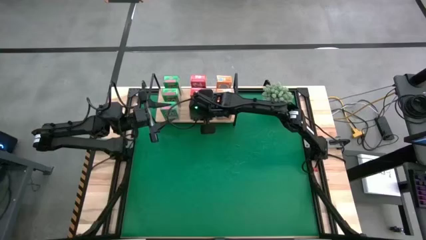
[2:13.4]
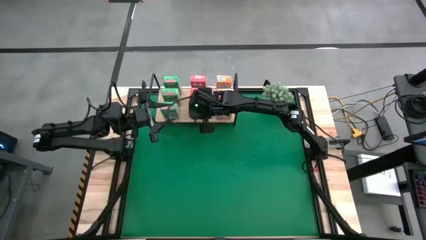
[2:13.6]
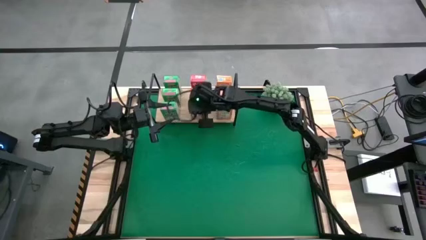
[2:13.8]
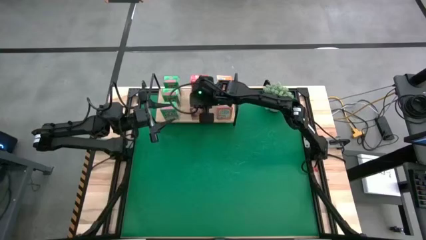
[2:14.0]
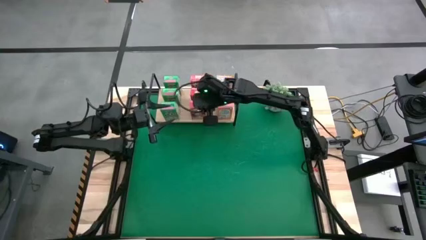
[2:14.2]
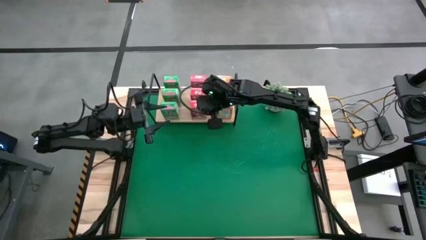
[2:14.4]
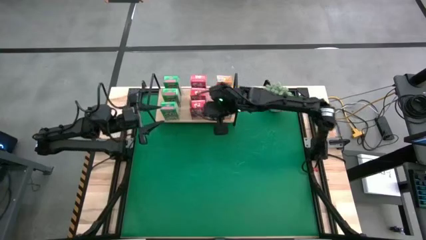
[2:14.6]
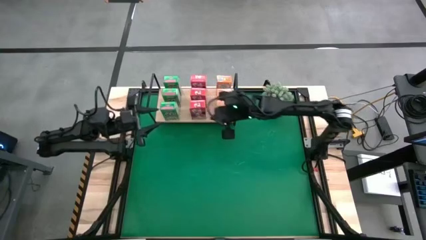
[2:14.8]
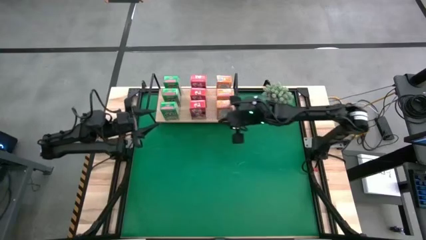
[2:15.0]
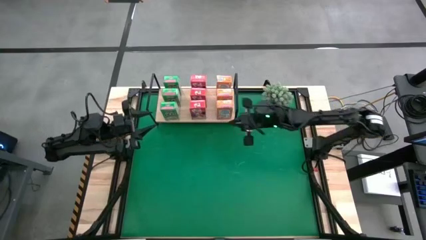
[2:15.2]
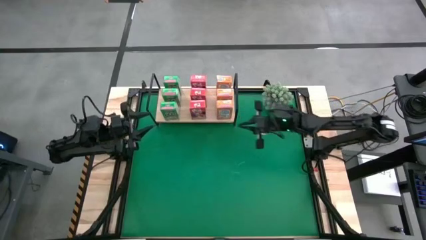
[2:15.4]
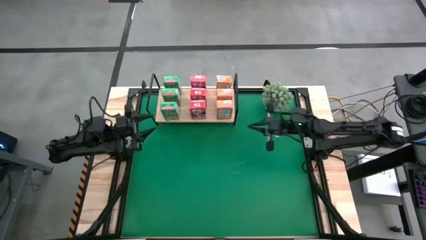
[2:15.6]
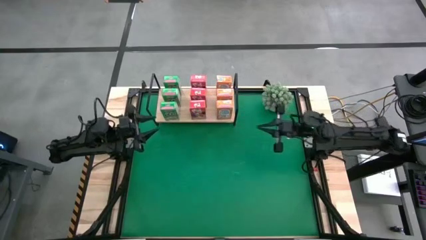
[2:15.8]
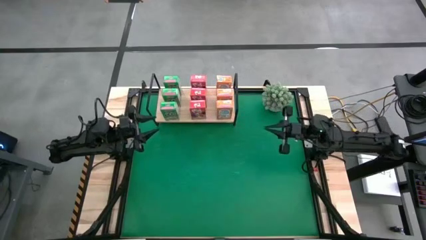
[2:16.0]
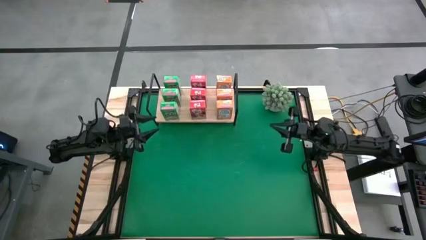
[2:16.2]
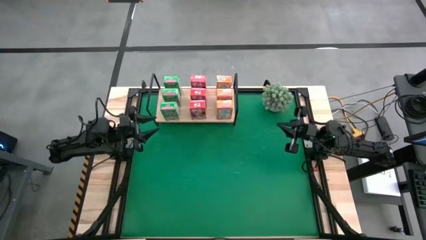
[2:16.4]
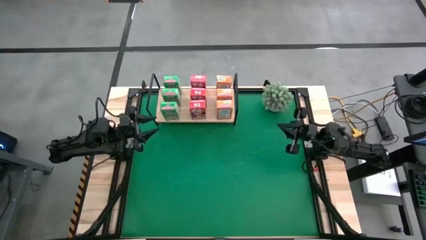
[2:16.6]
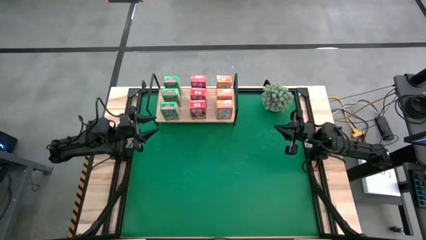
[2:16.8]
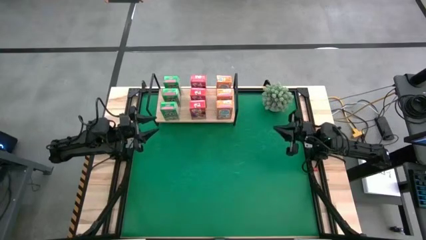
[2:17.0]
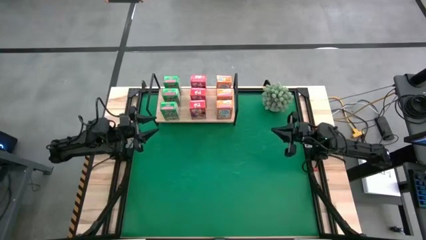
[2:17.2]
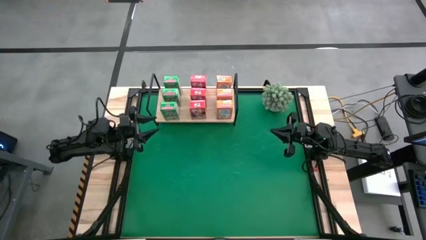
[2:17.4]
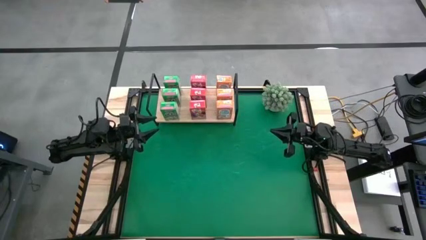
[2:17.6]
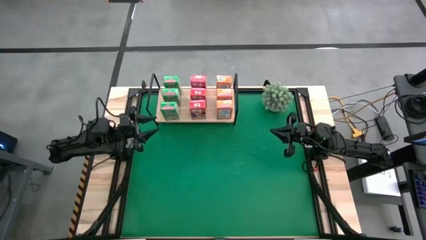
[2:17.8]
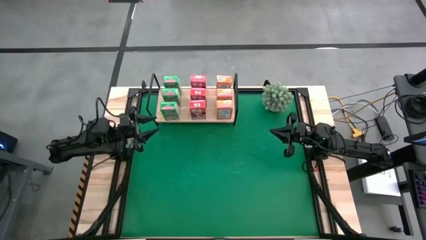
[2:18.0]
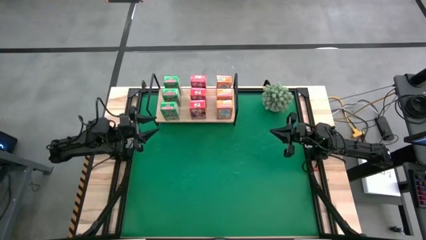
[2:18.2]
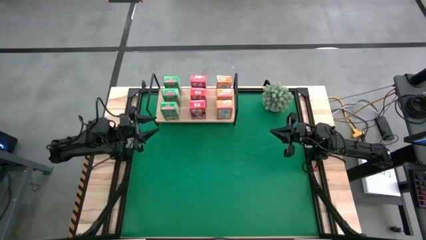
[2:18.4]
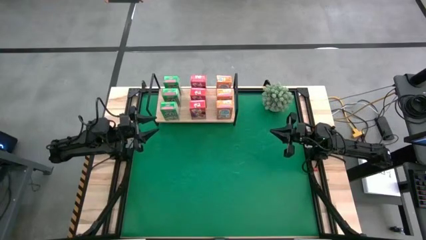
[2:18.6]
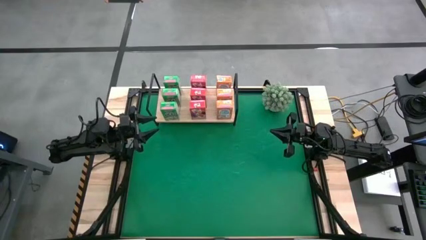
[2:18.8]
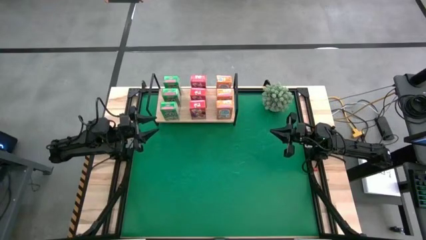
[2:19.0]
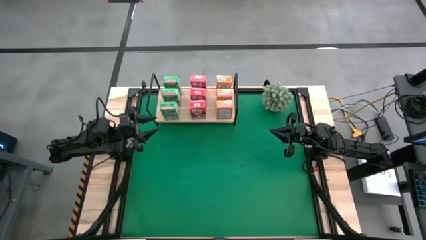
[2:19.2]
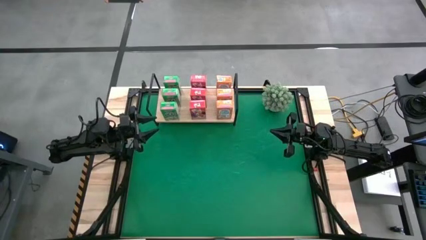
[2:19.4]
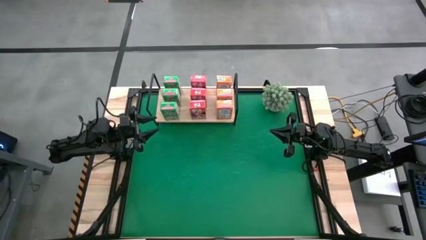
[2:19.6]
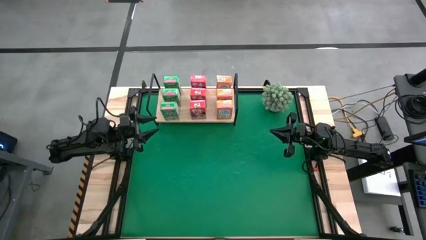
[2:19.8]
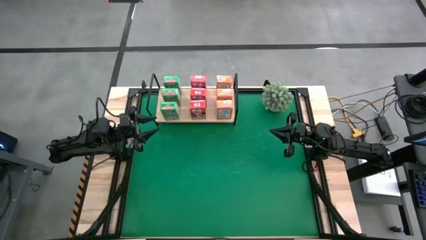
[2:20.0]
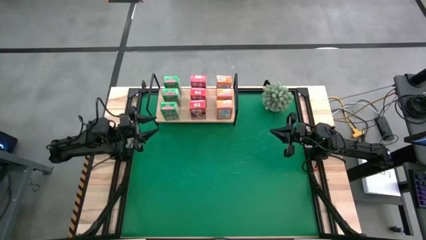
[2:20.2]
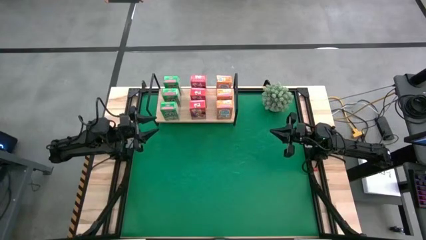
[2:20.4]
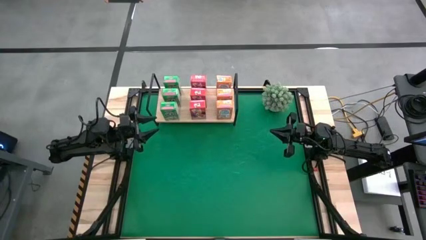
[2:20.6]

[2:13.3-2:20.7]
Task: Stack cereal on shelf
Return to Home Position

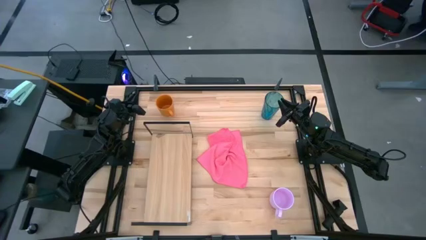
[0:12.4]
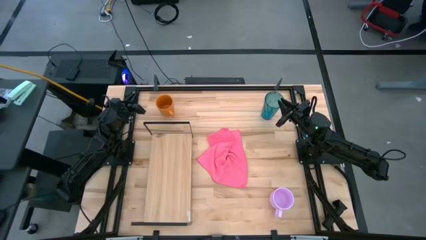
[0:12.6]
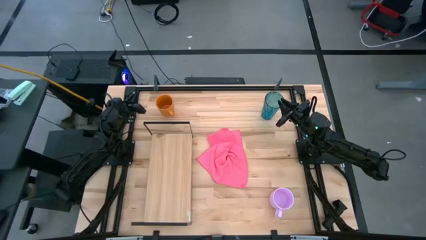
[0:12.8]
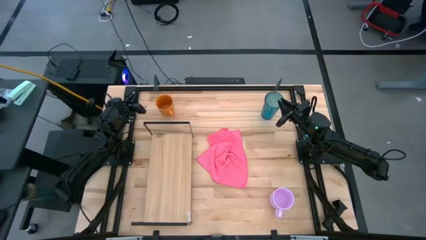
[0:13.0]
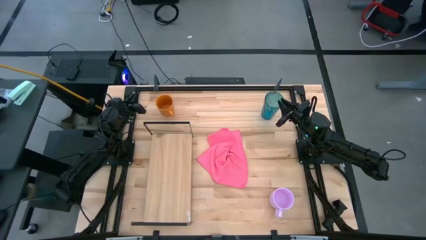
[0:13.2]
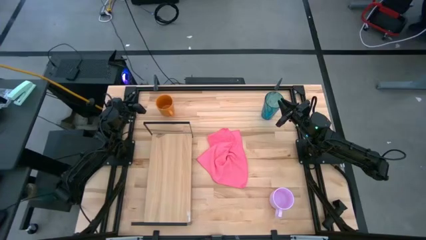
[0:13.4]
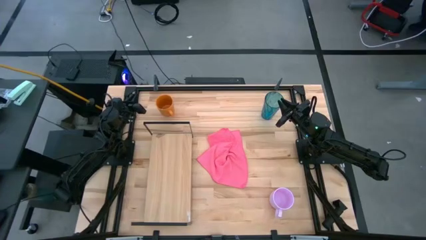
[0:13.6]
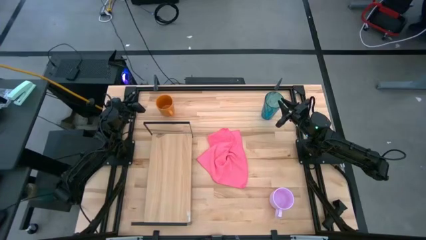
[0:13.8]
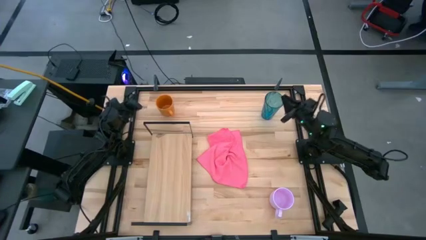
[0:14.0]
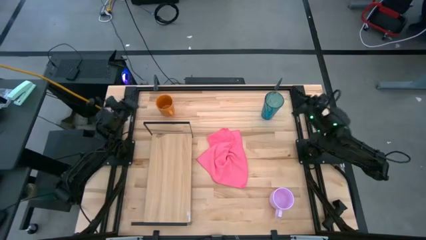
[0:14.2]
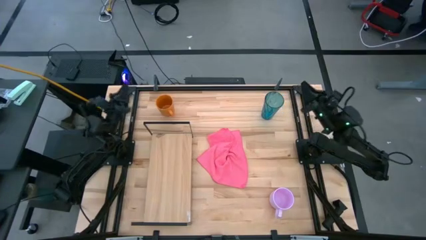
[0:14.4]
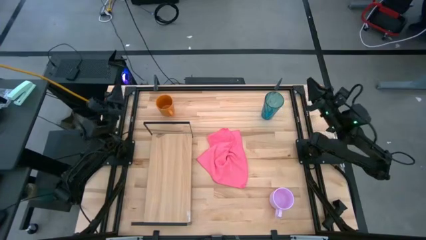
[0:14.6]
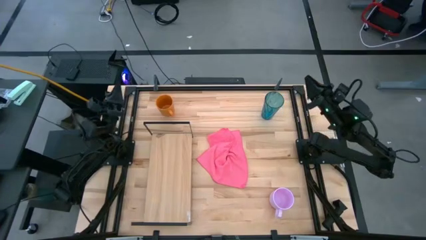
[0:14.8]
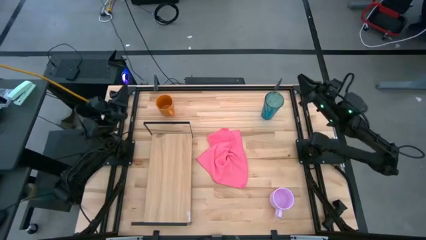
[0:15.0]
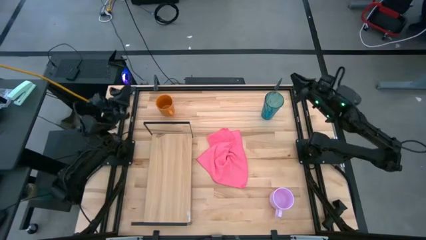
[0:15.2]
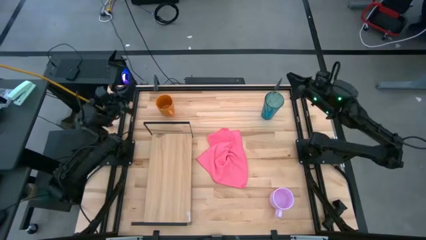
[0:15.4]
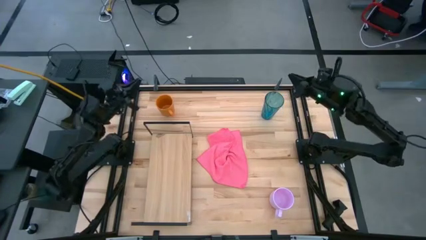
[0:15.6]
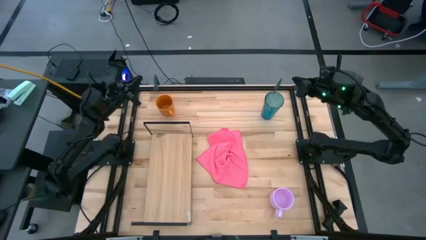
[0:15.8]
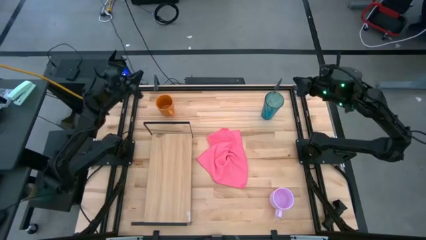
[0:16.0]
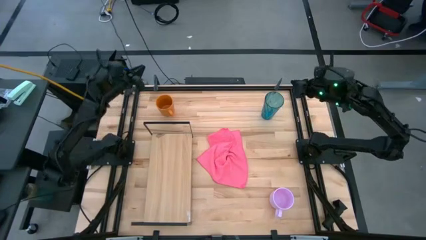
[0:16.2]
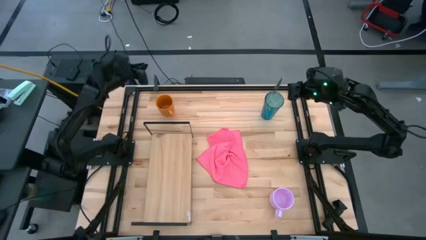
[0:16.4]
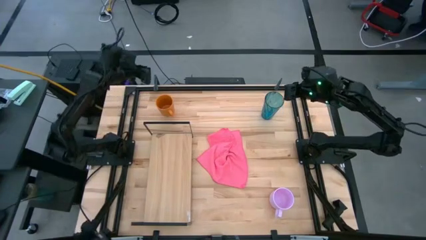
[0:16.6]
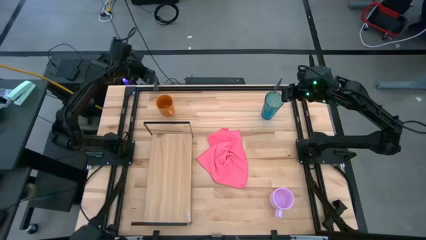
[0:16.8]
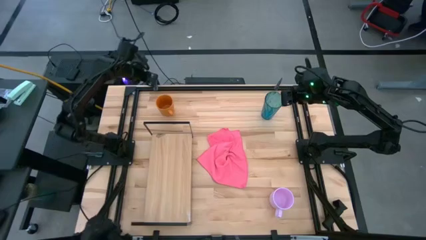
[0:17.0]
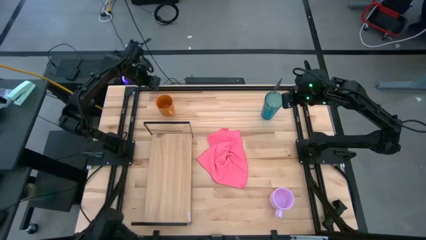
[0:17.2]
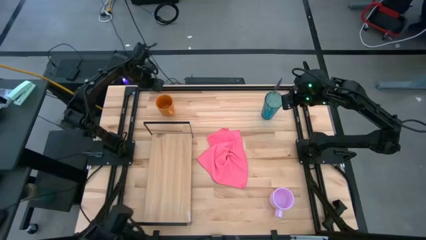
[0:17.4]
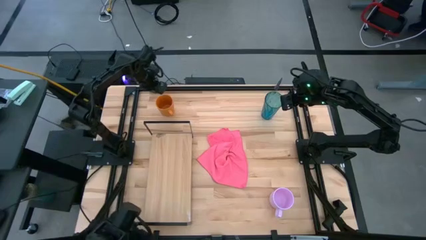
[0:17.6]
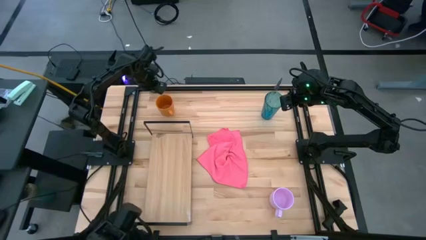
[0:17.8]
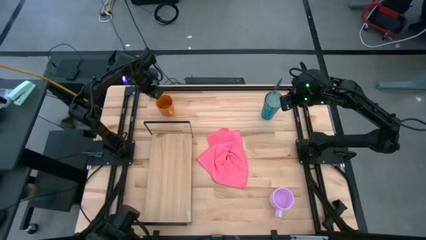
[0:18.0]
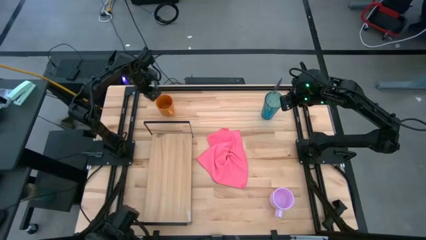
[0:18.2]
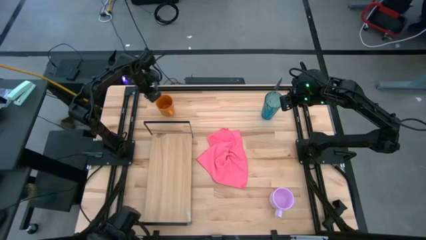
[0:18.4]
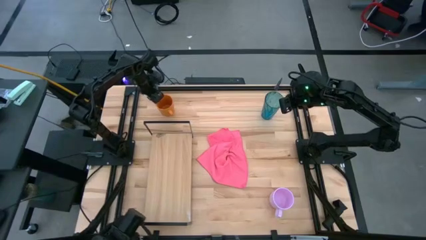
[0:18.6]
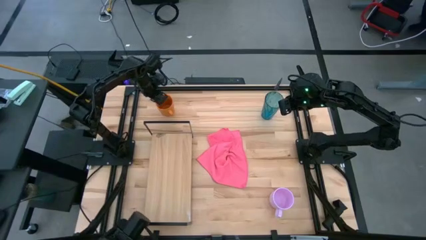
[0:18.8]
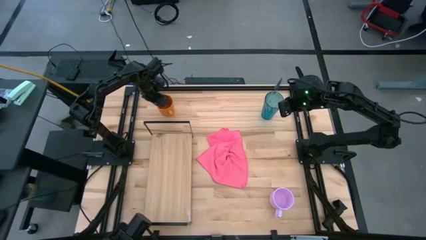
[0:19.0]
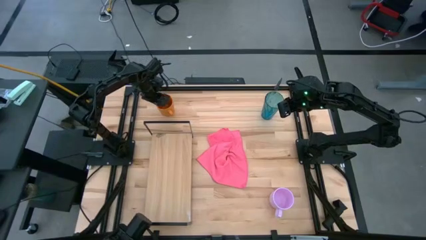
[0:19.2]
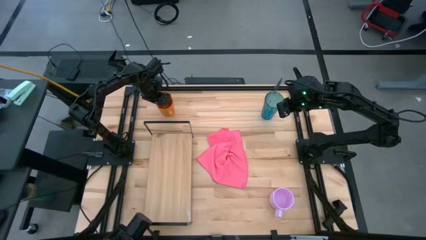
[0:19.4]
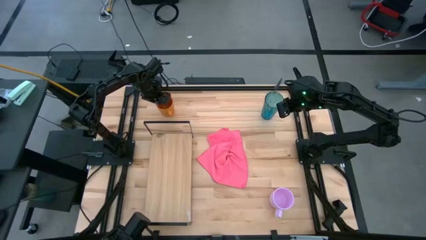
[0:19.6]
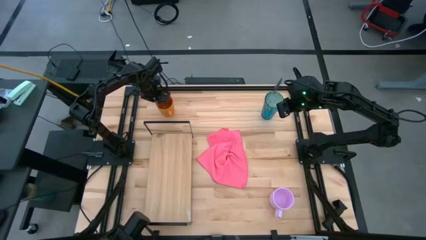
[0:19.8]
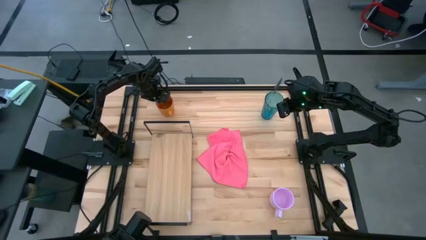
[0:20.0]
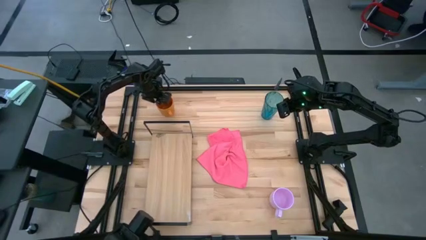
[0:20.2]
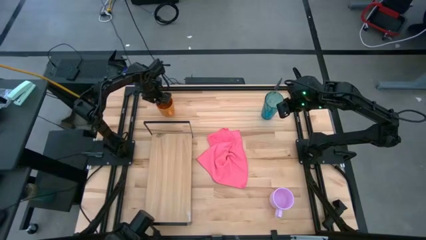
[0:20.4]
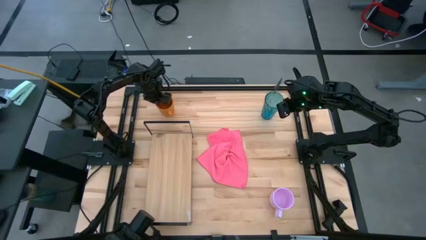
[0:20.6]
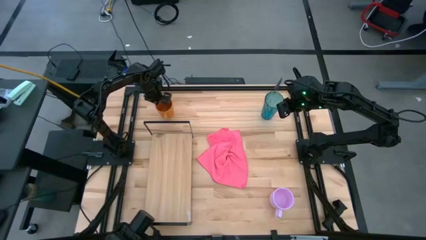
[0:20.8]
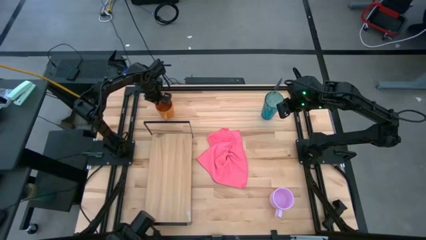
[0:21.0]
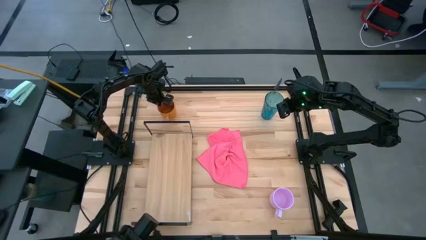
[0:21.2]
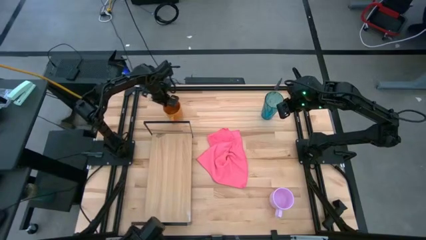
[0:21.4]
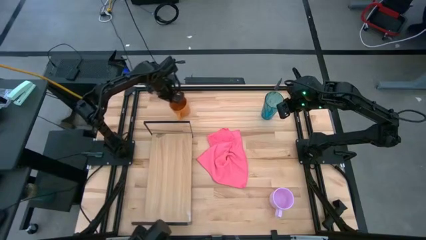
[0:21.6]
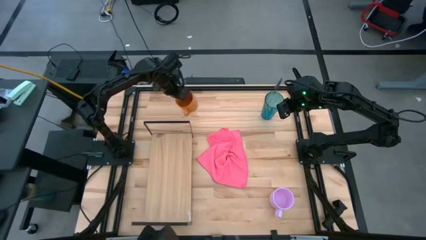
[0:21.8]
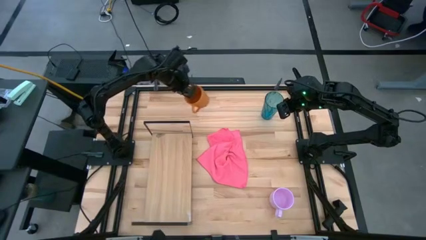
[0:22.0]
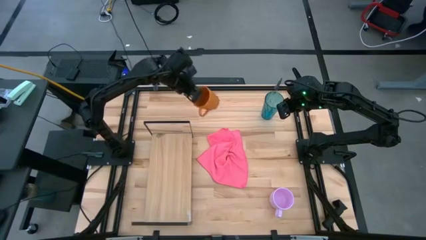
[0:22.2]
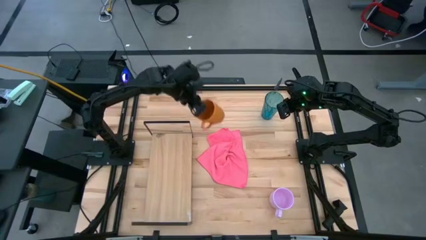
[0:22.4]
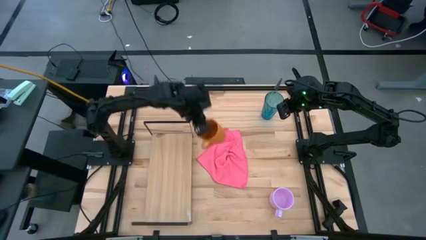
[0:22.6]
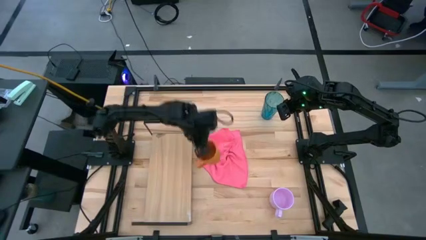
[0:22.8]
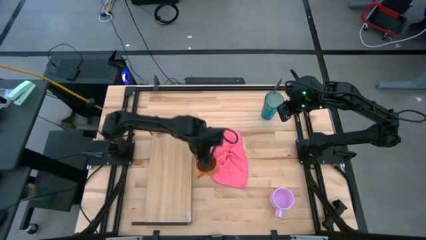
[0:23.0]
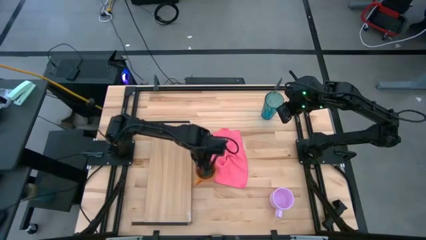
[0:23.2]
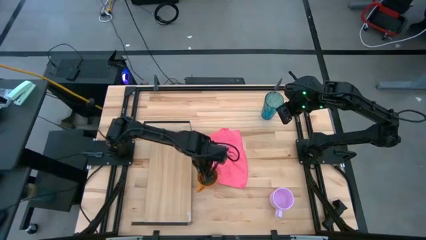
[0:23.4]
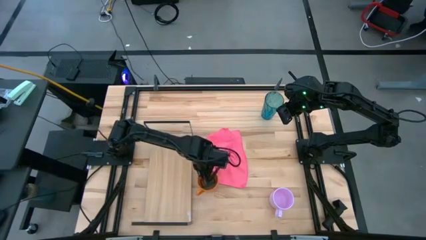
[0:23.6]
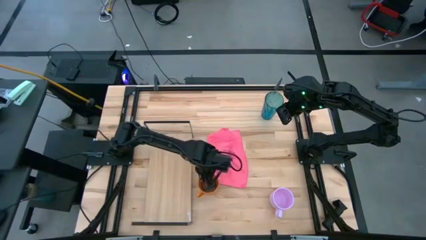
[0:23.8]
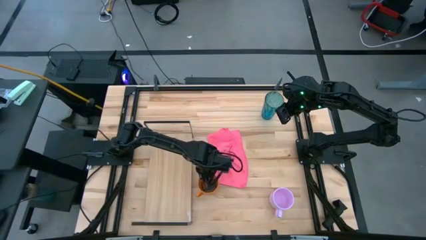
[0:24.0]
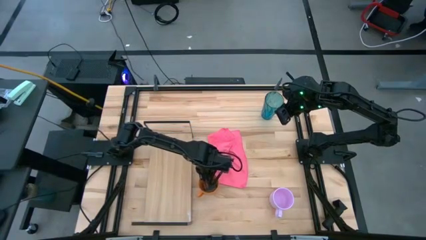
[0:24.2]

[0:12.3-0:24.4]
Task: Stack small to large cups/mugs on shelf
Move the orange cup to the center of the table
